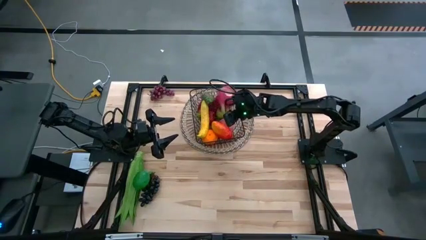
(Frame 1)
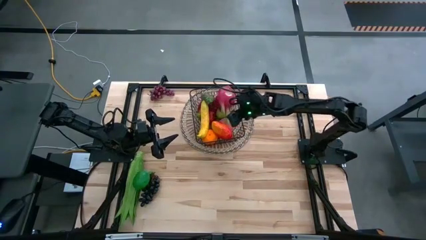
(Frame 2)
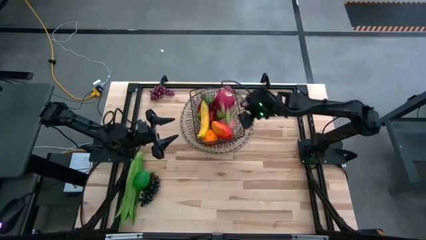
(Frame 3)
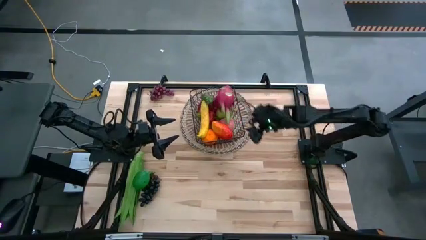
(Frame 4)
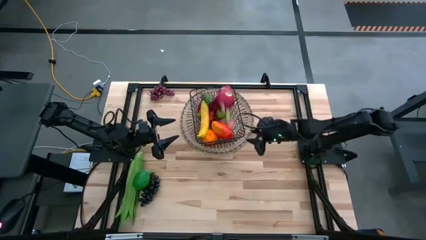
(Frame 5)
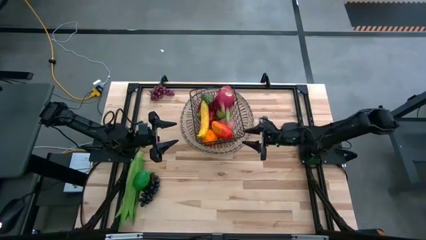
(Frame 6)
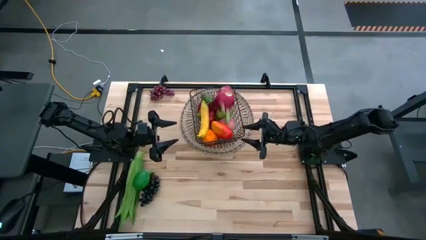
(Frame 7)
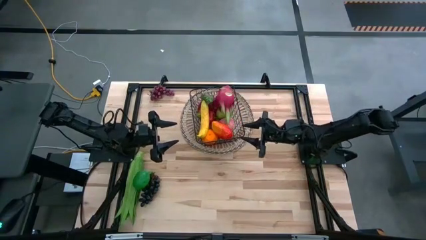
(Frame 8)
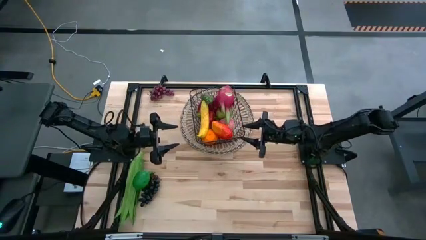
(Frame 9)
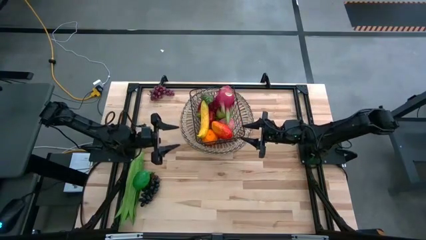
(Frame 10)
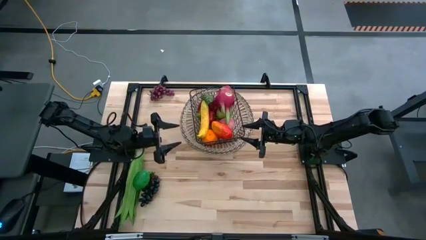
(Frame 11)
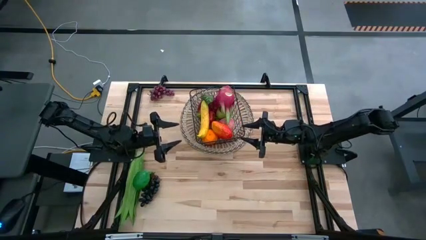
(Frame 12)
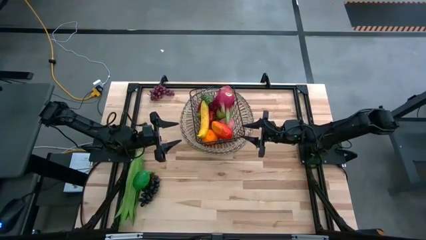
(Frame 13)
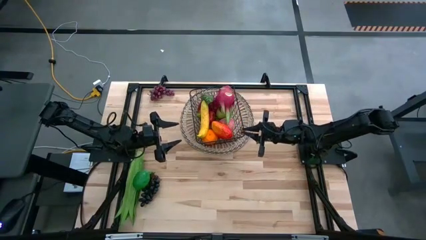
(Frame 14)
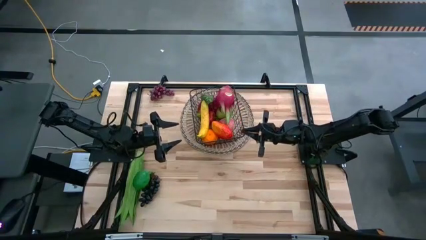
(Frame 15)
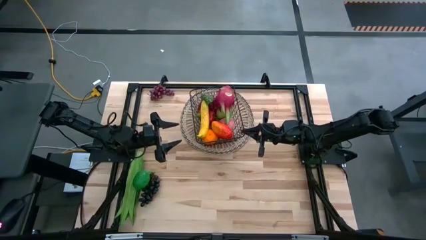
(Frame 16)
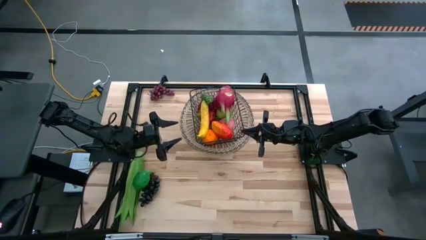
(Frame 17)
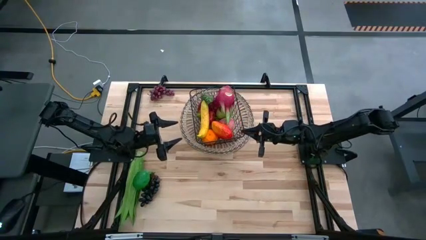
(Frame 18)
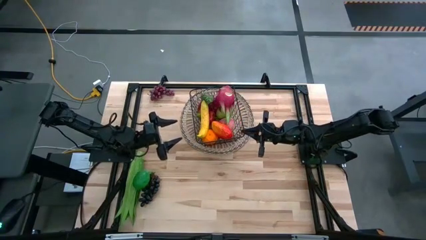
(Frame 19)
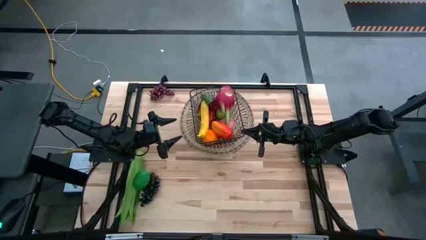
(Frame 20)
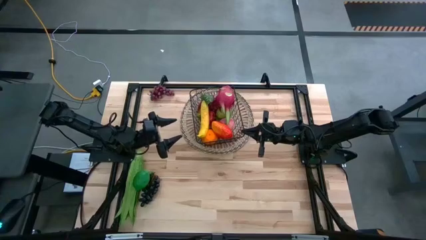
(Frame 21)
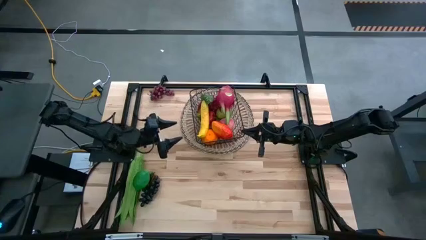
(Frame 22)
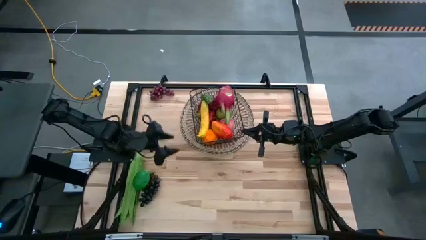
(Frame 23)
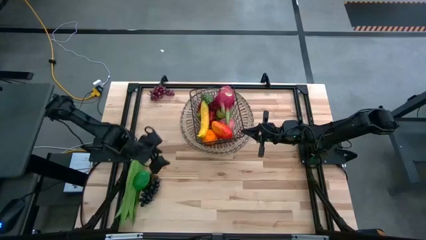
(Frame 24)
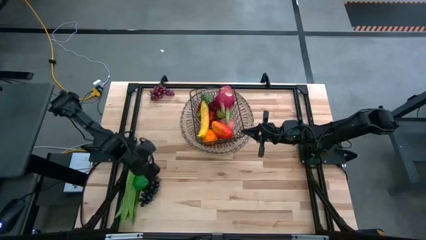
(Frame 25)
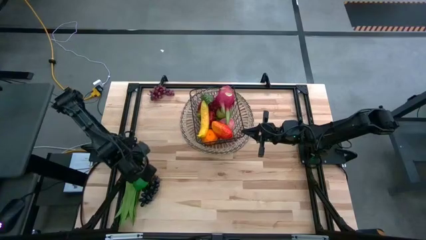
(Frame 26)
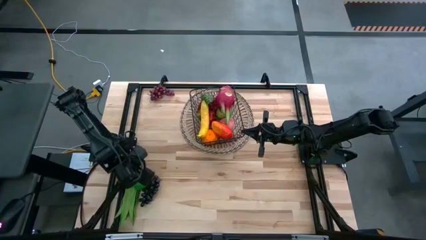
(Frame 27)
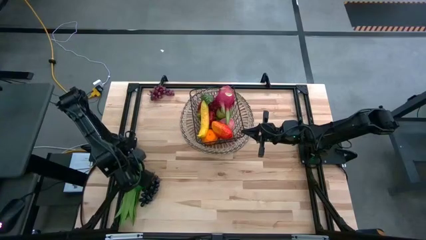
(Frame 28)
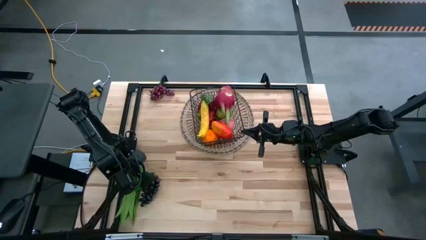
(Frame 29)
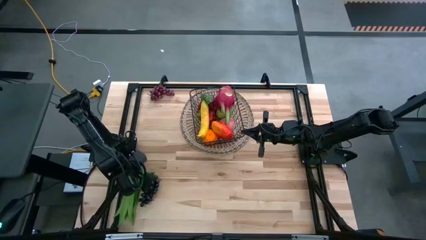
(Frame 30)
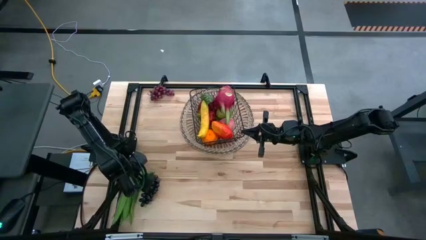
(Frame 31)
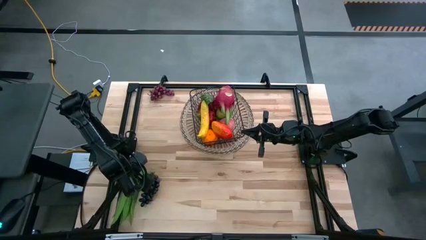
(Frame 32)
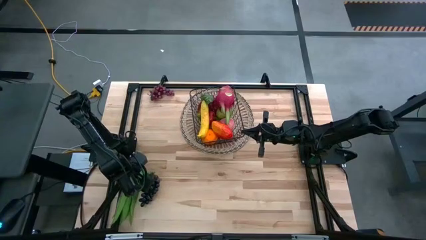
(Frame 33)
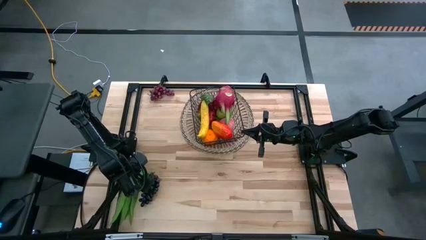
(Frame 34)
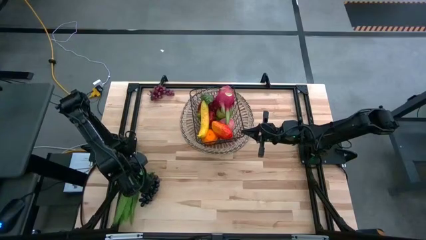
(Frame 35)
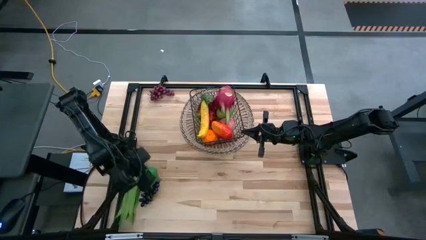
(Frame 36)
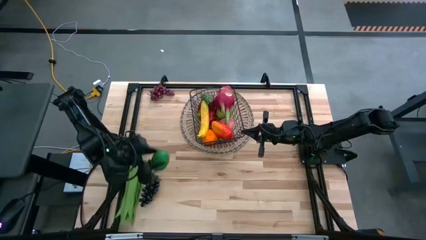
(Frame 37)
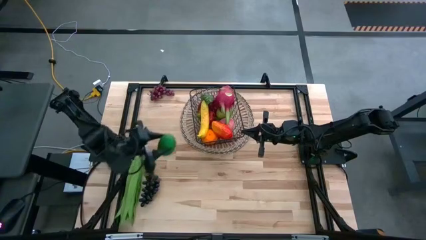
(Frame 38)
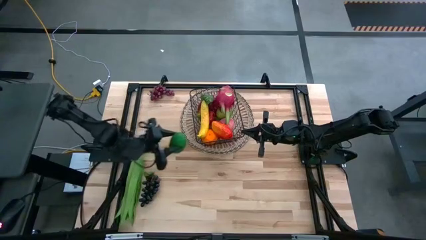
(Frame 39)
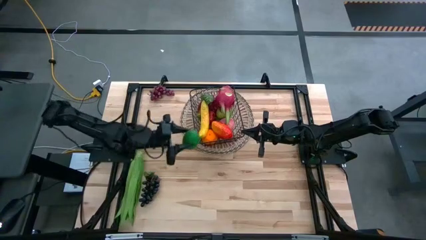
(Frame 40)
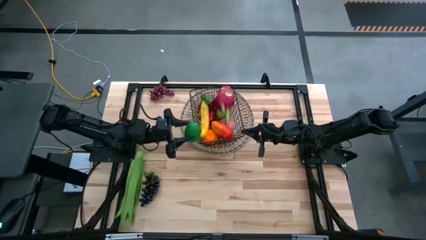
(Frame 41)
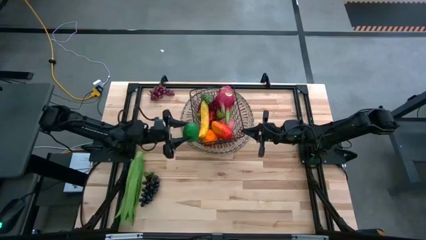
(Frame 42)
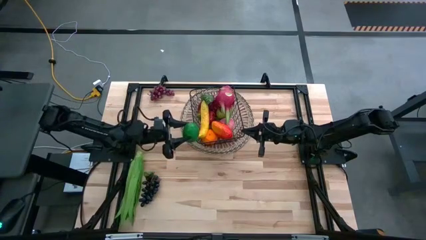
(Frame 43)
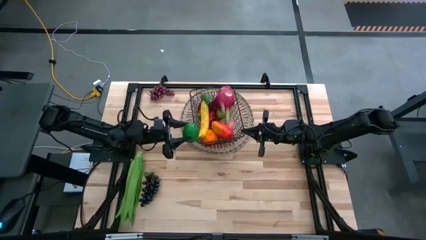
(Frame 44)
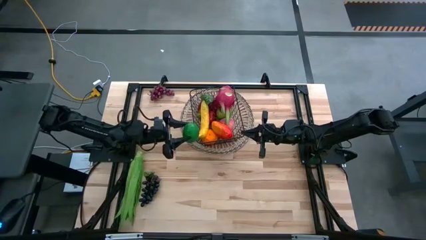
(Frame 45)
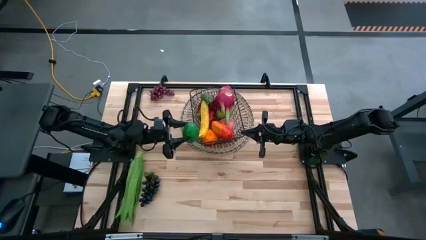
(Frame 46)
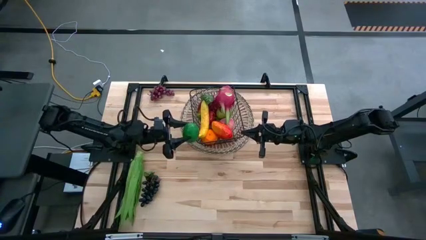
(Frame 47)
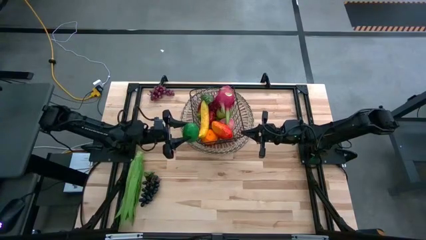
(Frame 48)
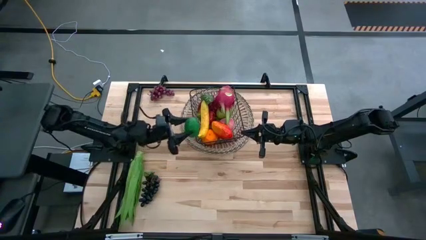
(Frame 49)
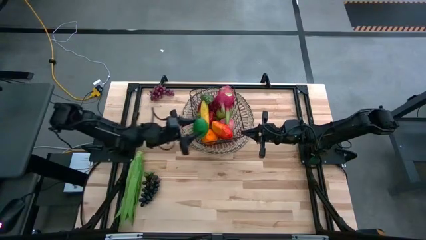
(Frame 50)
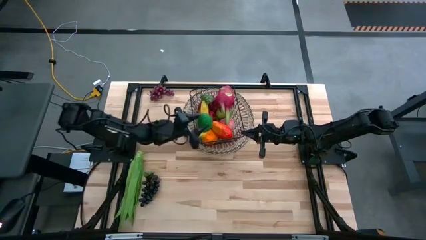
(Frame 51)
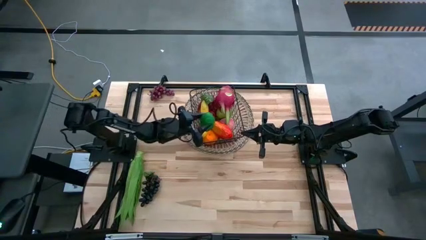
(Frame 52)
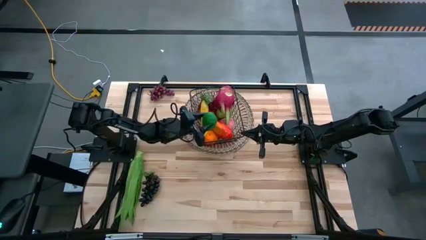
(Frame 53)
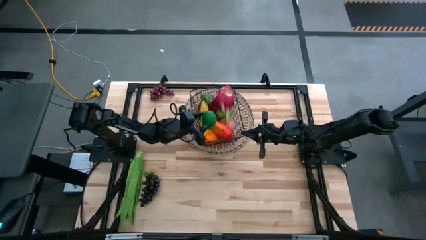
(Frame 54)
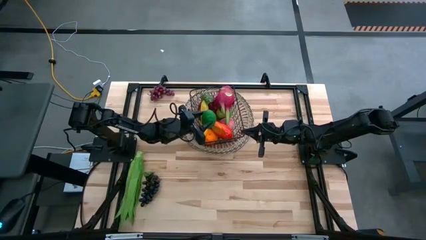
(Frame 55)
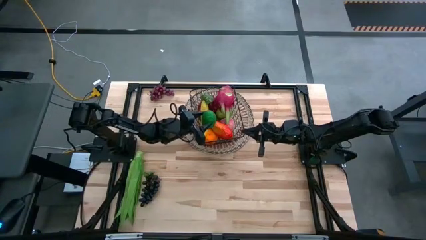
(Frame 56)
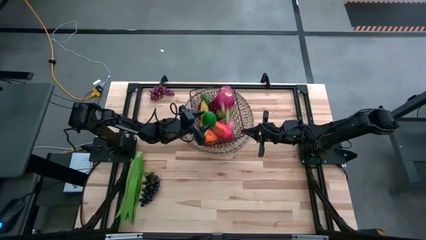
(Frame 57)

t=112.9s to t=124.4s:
Task: Build produce basket
Put the green lime into the black wire basket

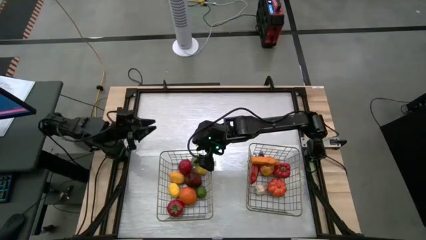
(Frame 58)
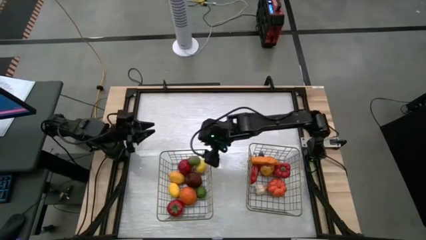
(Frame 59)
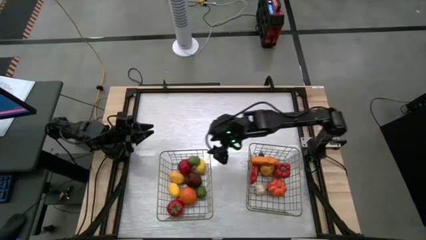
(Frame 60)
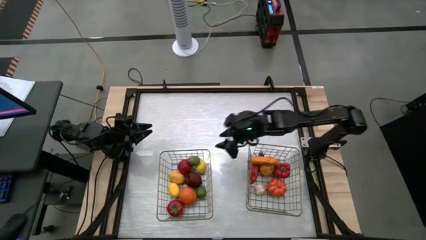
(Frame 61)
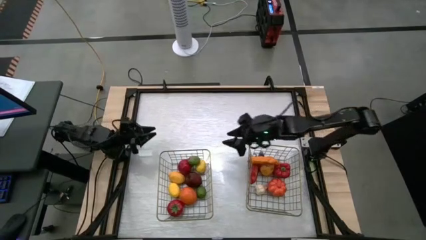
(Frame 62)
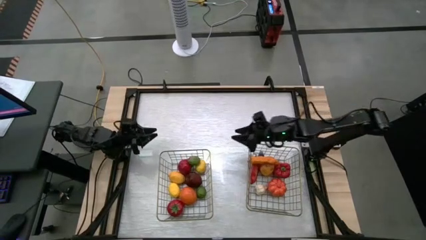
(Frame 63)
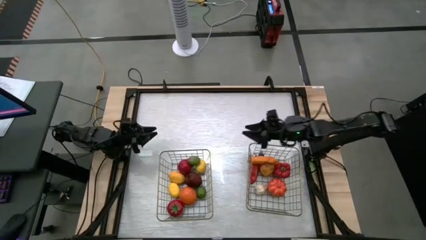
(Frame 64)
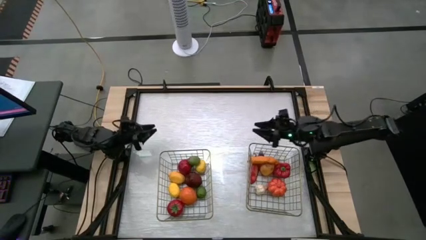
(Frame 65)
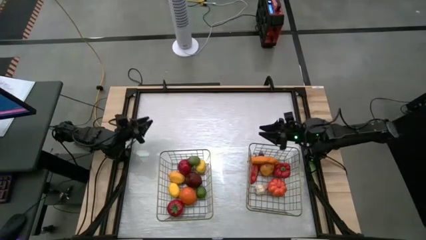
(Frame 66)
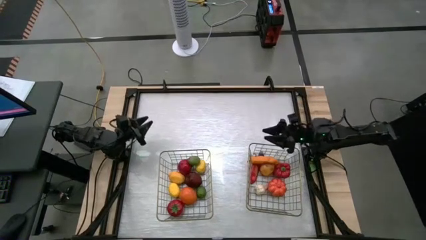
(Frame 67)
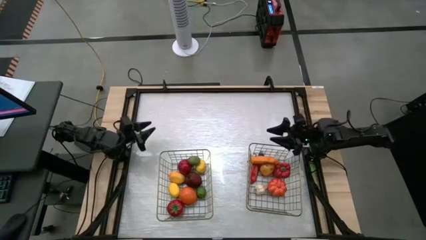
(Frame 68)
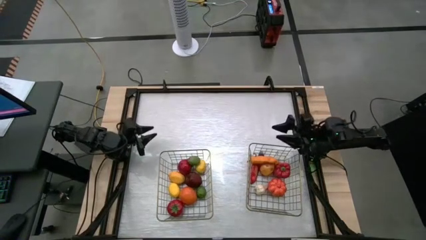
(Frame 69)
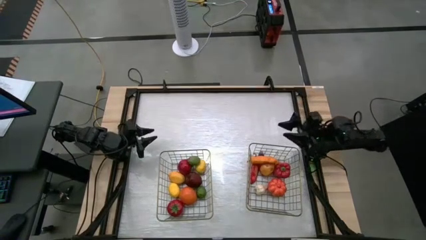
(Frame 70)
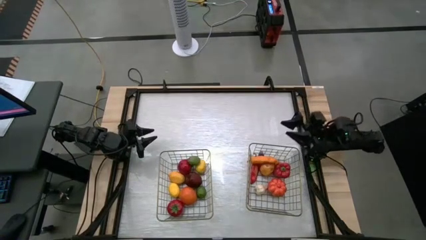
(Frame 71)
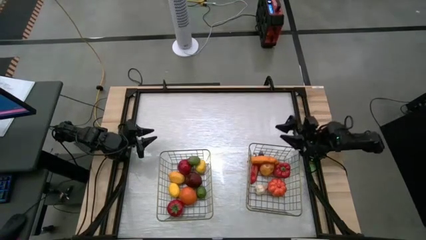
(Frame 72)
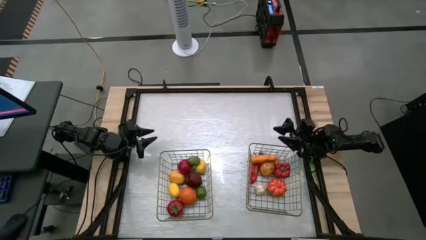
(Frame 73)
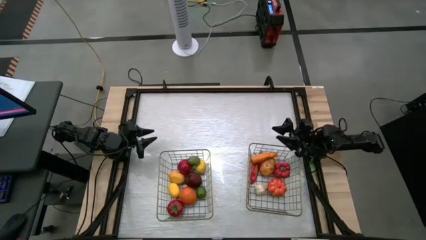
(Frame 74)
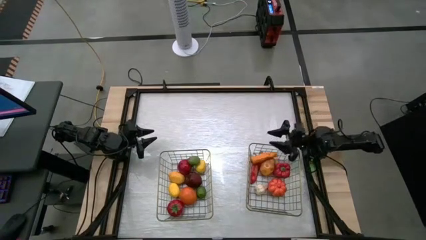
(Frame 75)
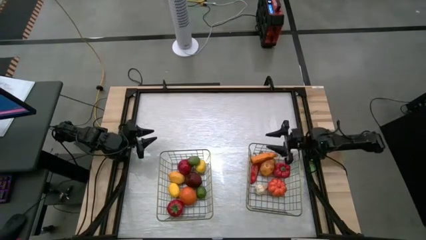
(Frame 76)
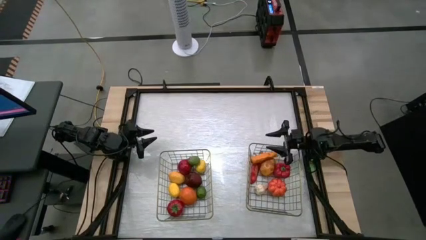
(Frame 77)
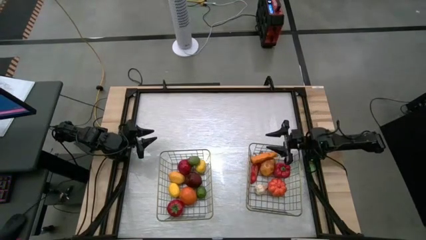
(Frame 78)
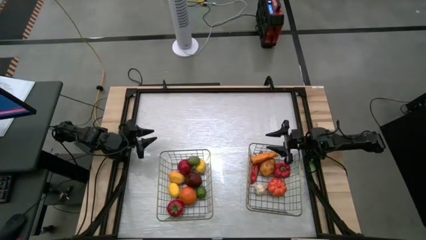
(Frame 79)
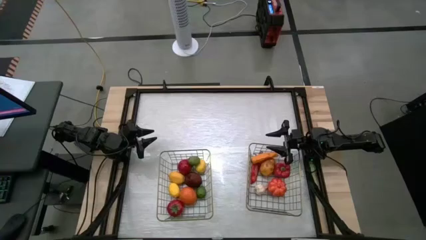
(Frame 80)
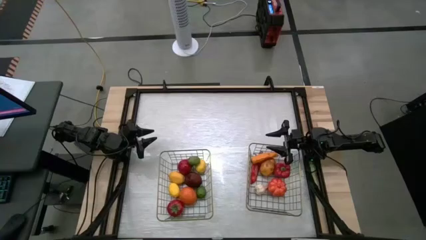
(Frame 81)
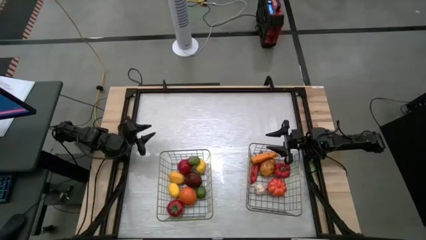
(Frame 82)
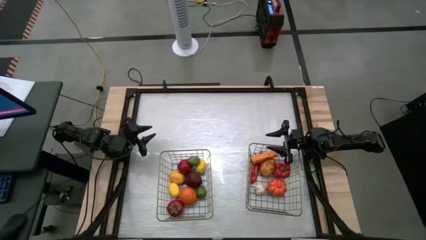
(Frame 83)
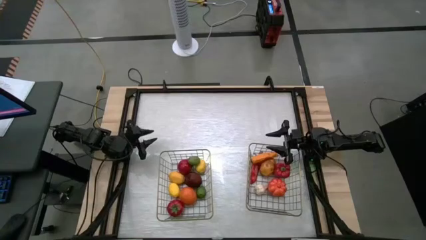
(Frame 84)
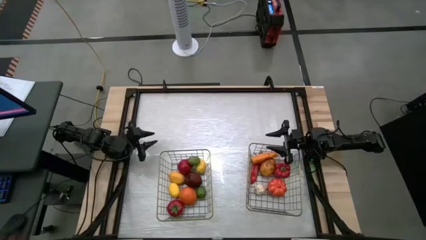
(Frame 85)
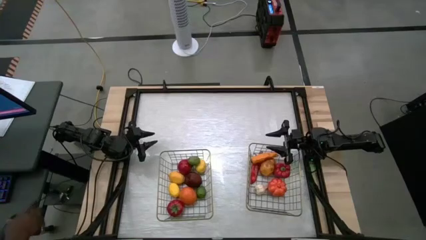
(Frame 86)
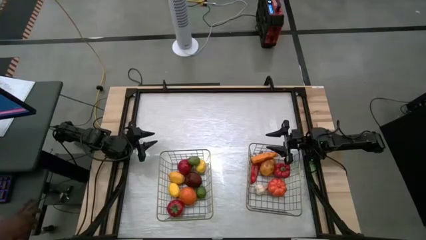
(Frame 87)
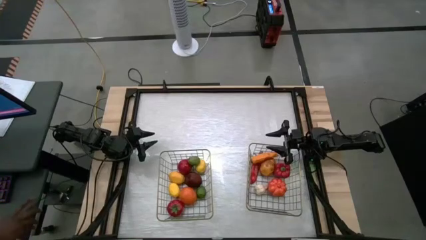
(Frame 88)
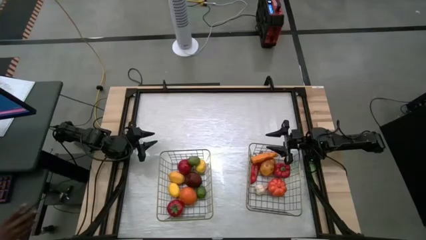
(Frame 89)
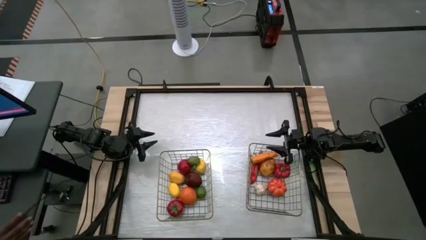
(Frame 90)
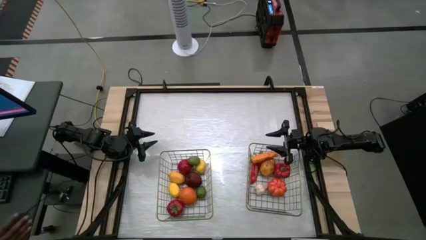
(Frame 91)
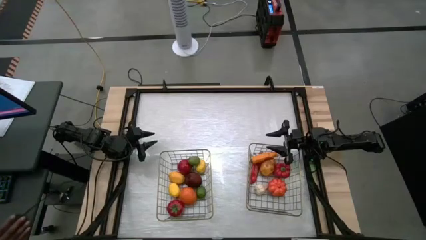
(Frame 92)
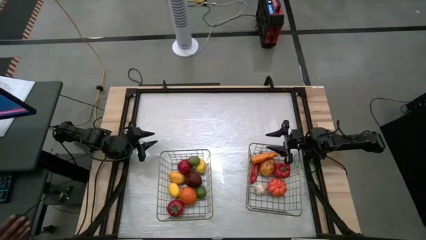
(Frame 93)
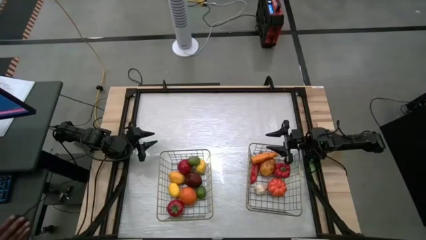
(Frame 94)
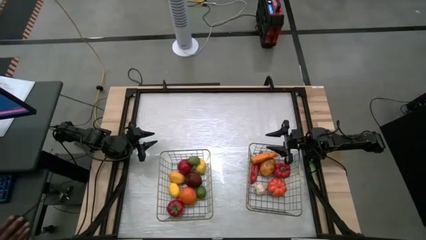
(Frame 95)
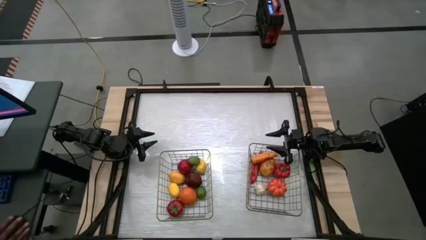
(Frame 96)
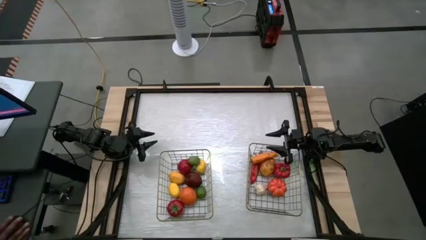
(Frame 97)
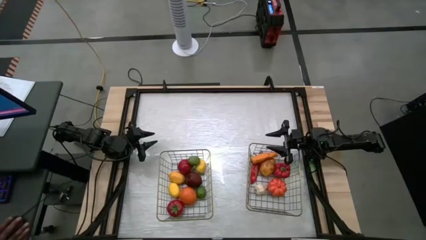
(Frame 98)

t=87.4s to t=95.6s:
Task: Sort produce into baskets
Return to Home Position
